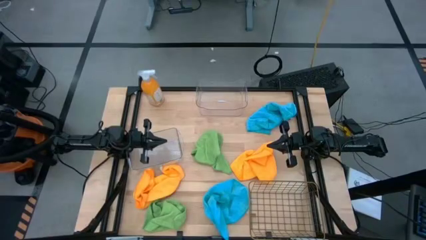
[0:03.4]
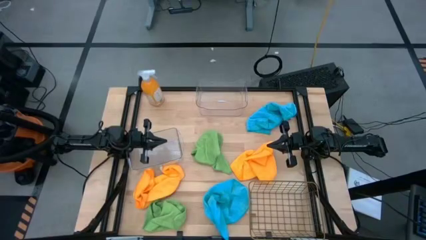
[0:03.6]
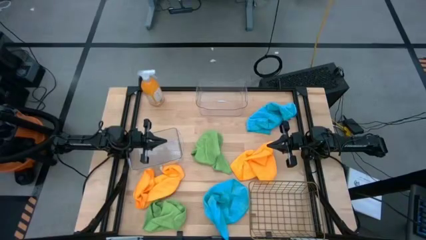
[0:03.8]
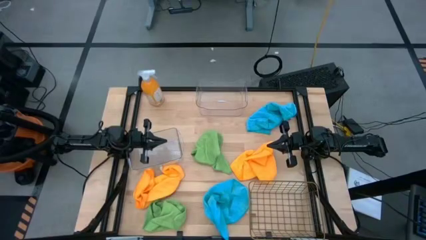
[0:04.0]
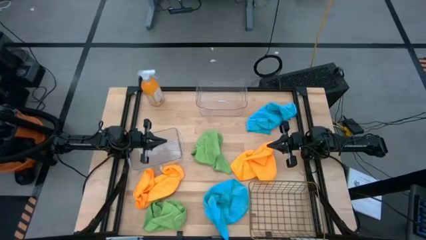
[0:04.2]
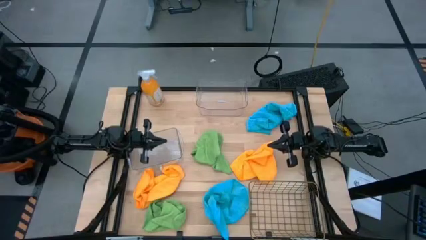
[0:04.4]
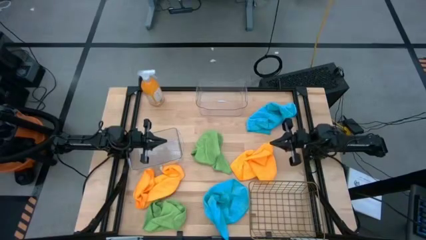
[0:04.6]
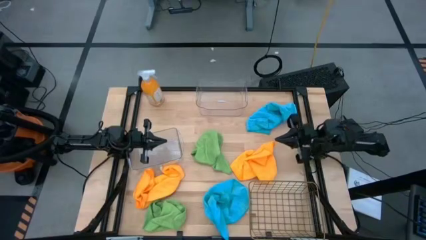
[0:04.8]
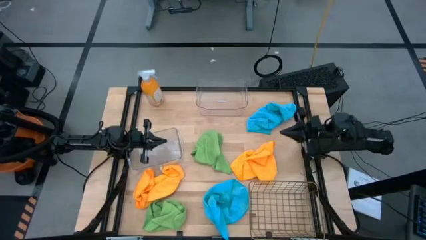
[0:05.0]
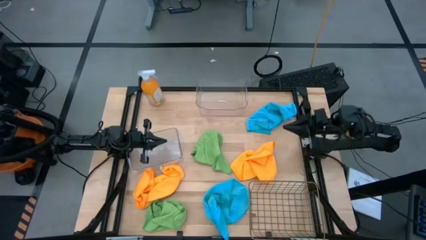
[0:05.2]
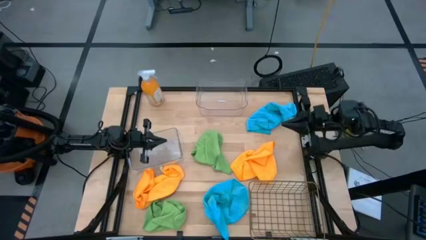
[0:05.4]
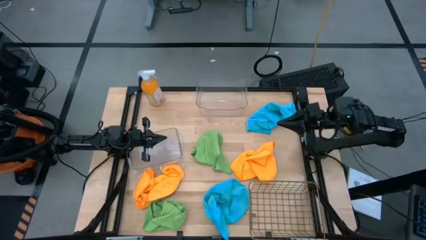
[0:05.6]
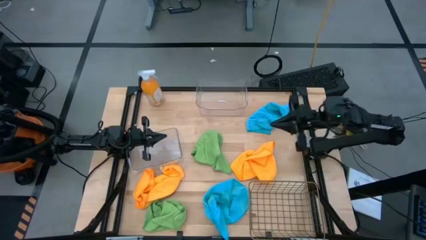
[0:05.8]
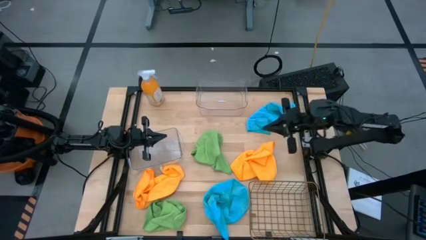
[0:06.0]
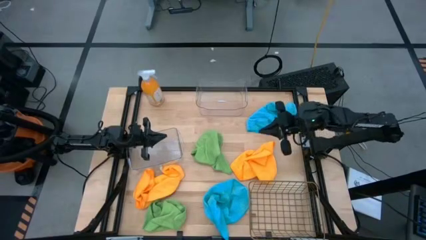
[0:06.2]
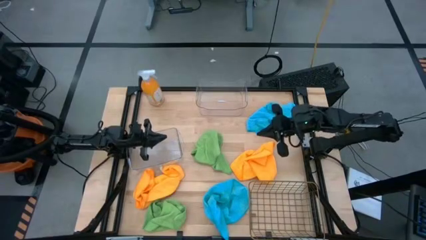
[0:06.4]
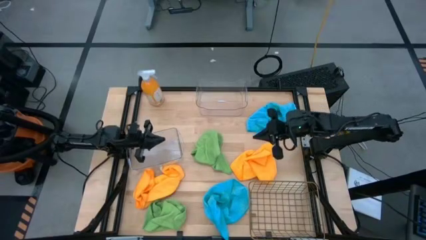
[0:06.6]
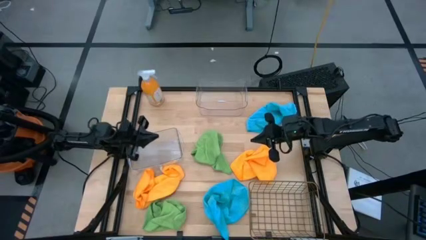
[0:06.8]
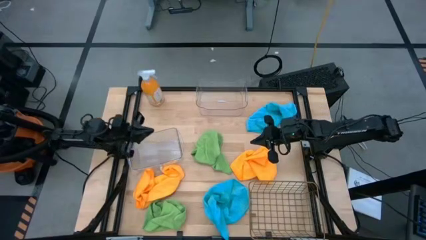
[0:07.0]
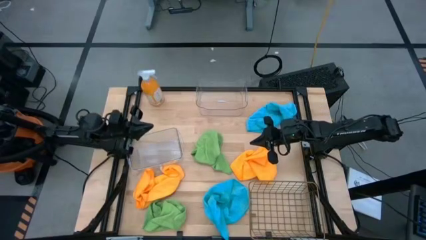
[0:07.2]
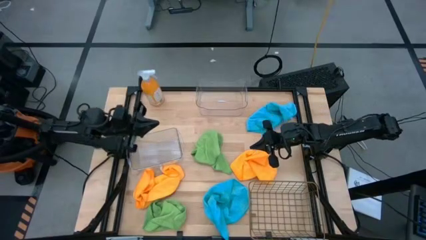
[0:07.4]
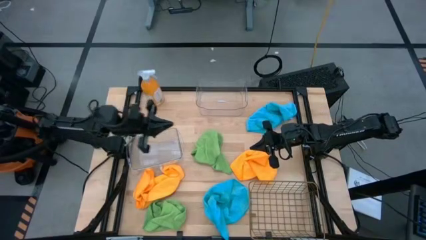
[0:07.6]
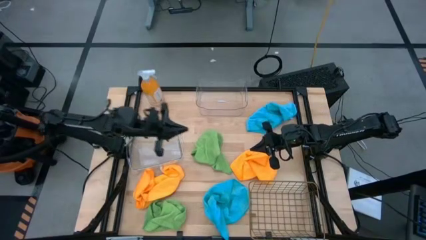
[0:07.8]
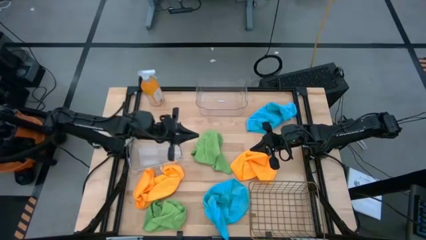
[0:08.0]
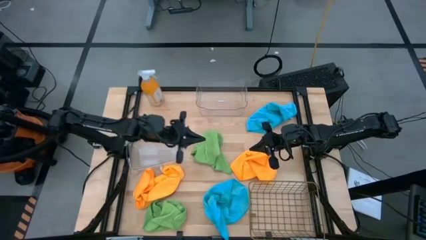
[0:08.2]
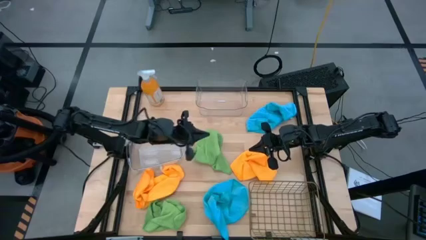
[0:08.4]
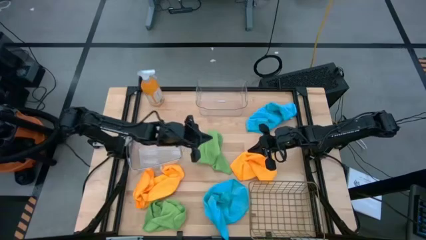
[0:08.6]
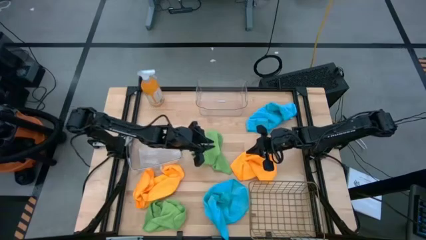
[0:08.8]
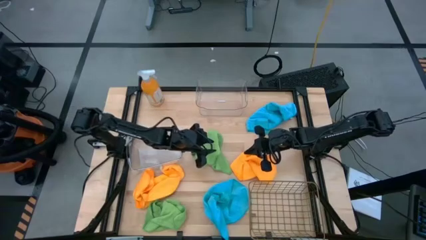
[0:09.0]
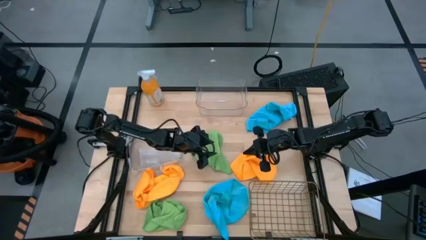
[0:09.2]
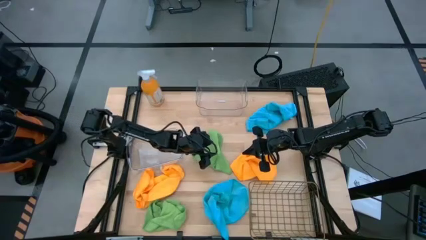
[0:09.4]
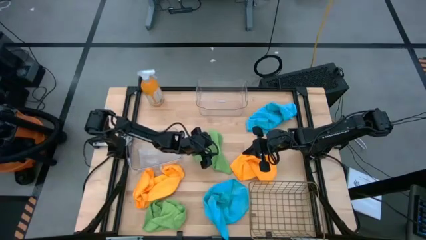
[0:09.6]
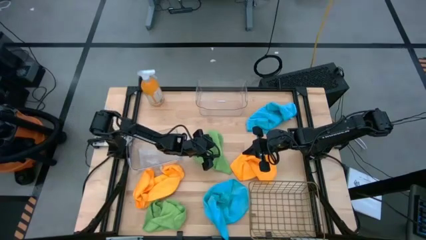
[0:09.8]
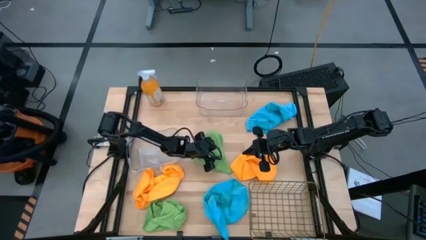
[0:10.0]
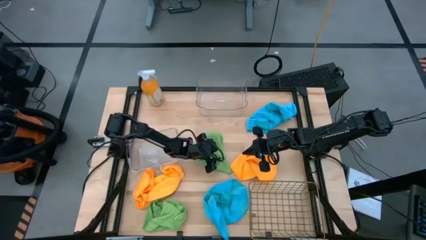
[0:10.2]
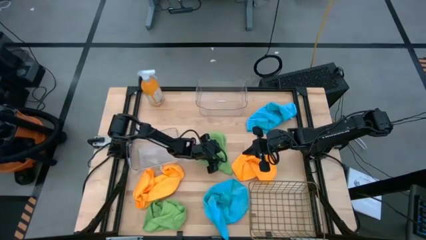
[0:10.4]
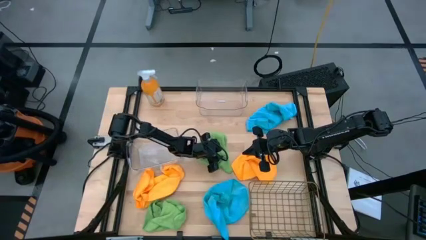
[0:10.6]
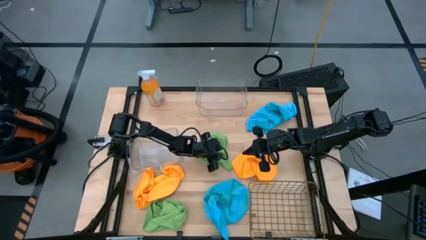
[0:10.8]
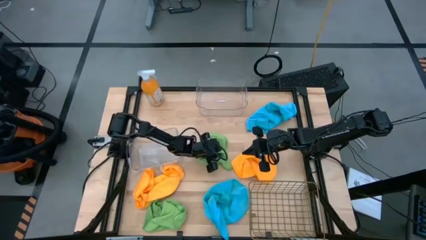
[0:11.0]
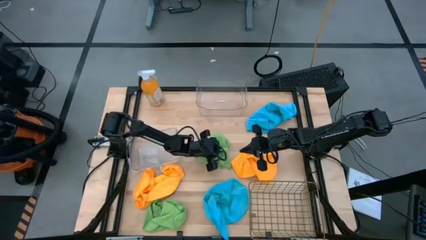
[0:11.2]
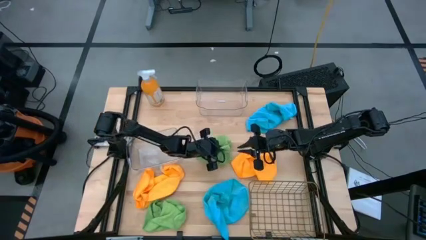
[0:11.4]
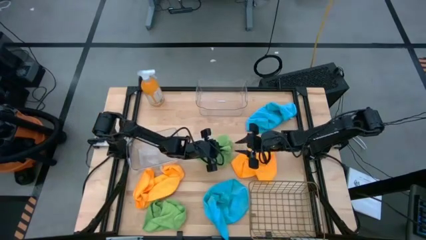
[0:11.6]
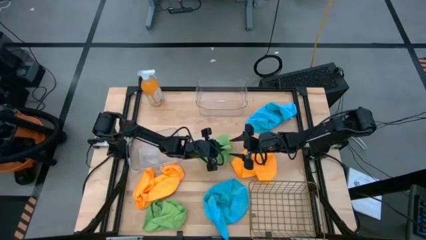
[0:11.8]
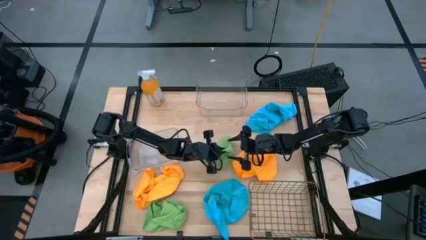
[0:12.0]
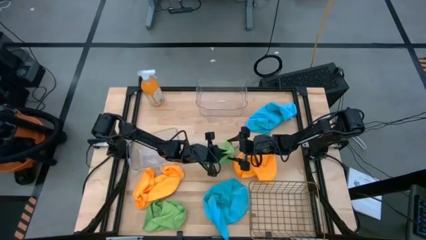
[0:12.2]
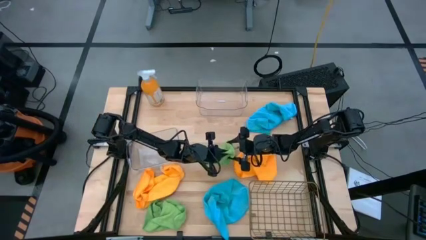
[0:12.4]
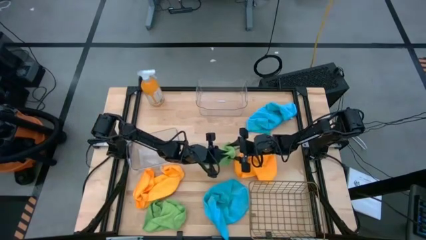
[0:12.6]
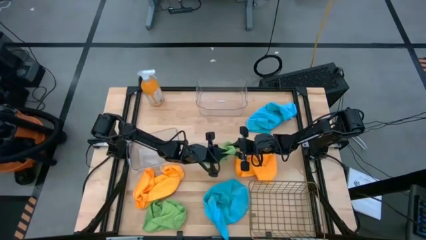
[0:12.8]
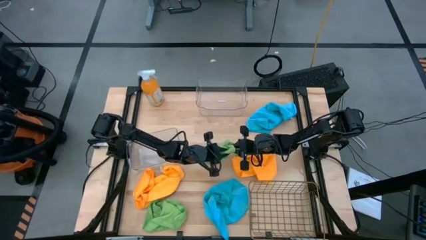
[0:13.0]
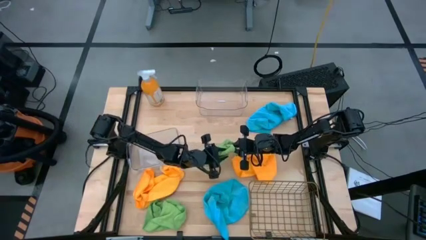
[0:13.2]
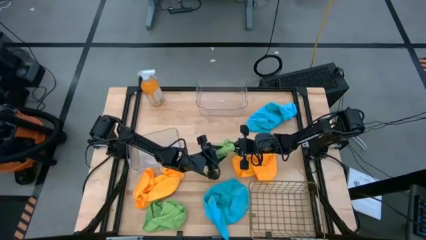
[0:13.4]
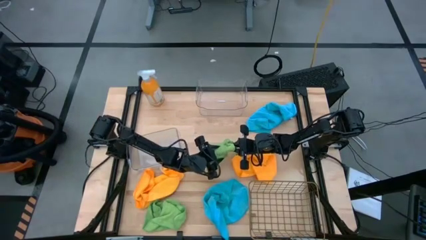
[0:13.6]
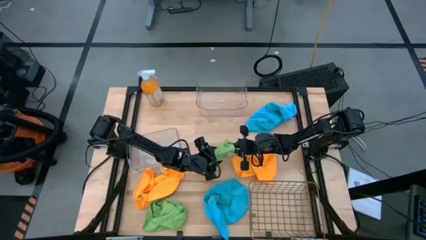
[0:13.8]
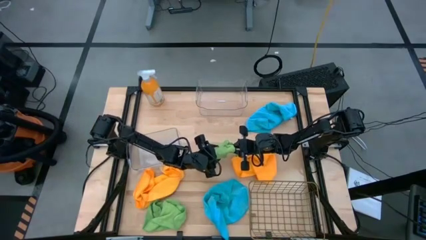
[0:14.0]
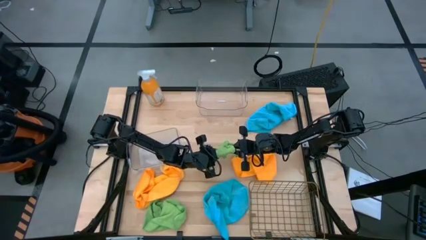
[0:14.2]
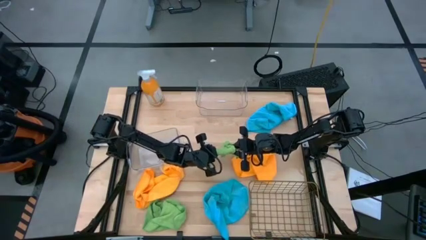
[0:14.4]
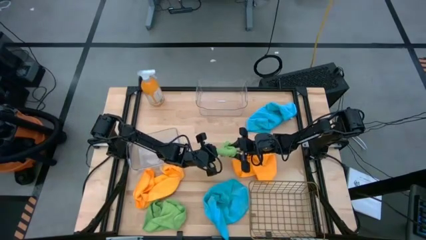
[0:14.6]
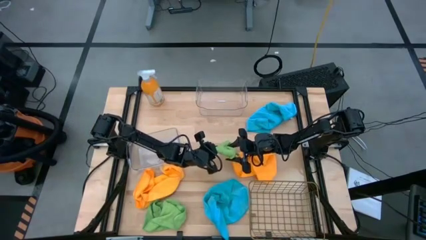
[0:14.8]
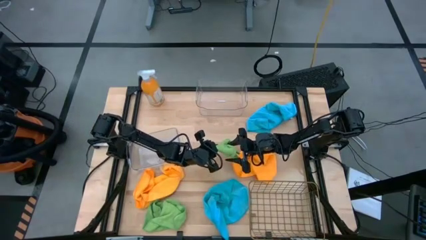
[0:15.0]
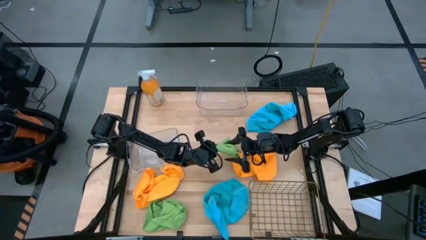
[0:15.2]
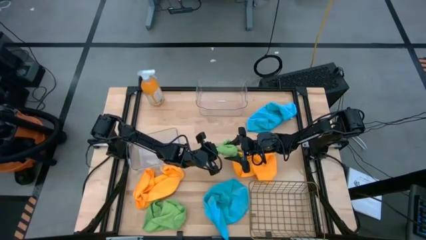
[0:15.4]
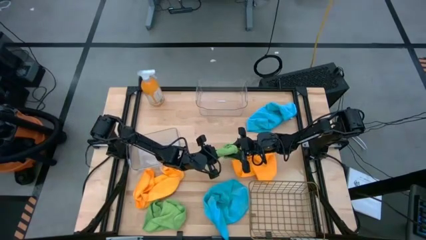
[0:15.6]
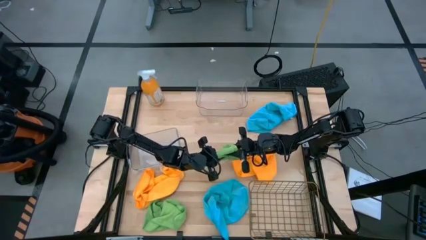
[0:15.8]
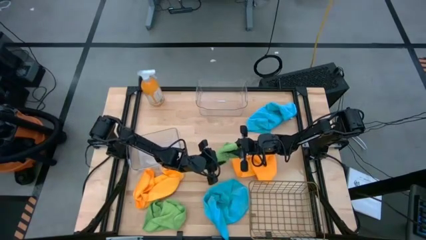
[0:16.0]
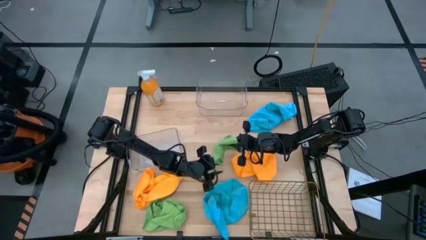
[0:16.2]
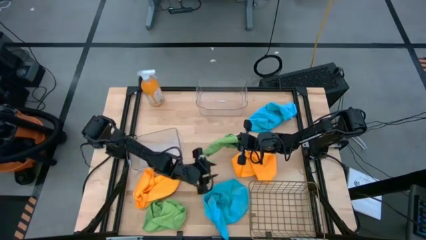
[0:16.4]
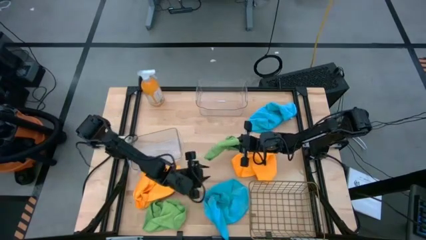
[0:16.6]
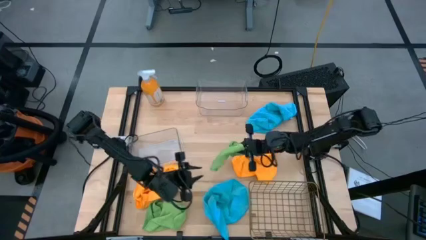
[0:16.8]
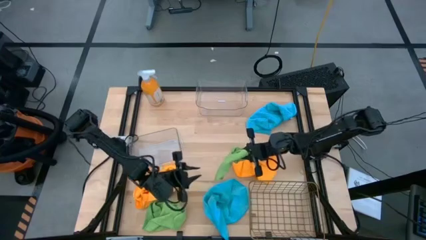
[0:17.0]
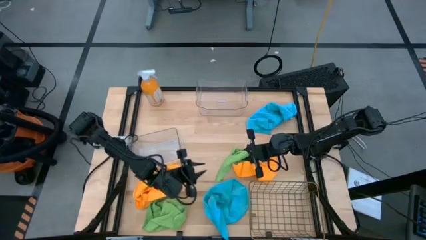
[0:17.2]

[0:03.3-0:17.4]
Task: Sort microfiber towel by color & place in baskets
Put the top green microfiber towel into the bottom transparent bin

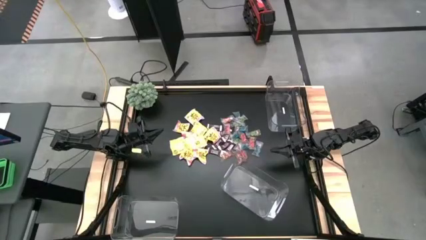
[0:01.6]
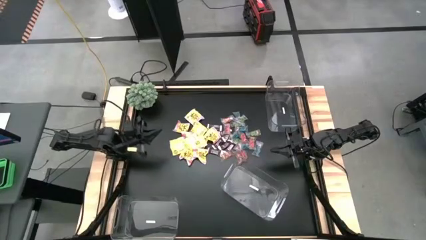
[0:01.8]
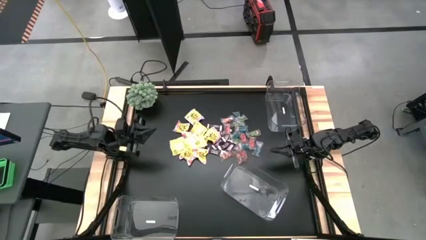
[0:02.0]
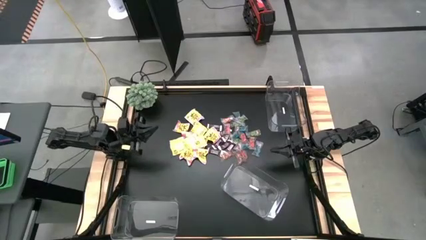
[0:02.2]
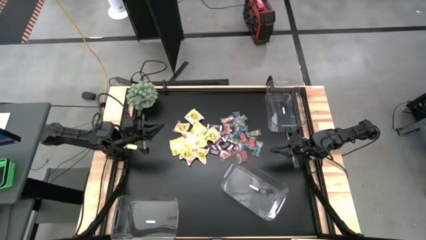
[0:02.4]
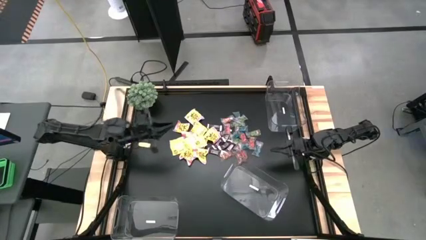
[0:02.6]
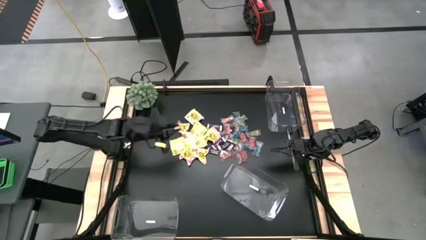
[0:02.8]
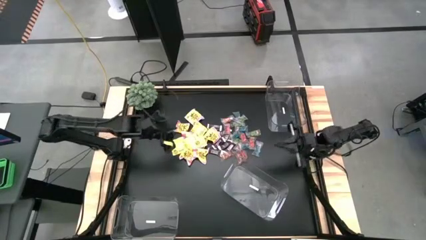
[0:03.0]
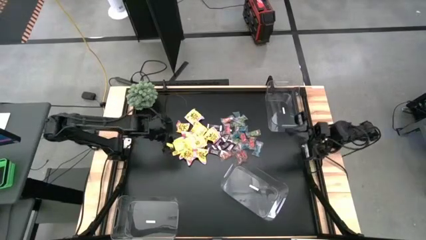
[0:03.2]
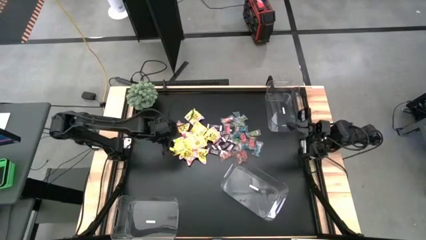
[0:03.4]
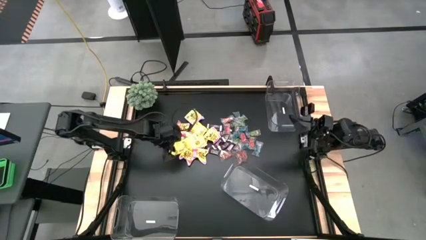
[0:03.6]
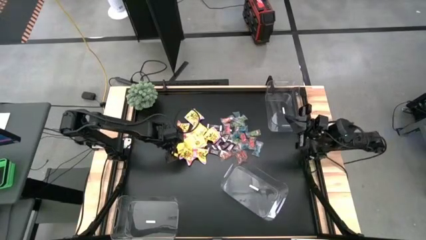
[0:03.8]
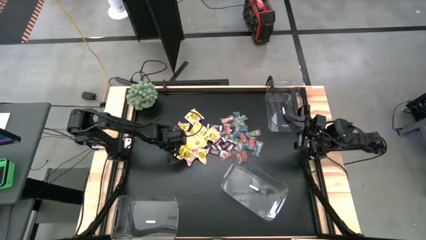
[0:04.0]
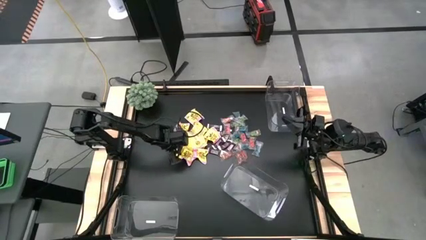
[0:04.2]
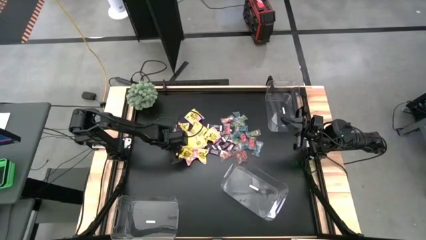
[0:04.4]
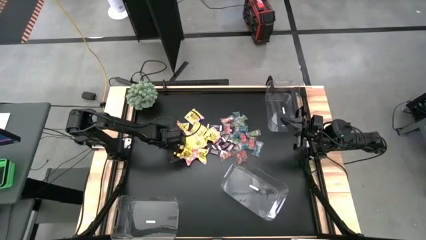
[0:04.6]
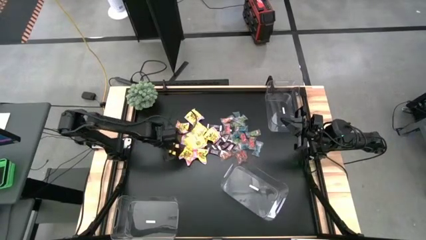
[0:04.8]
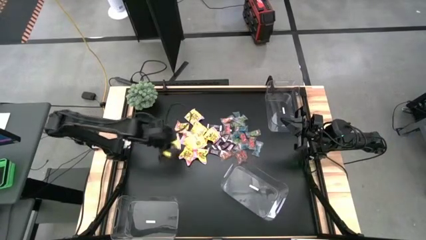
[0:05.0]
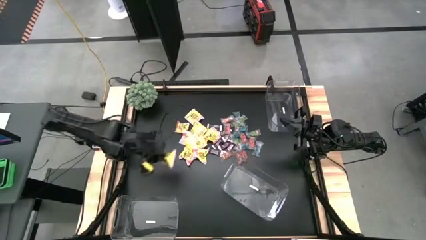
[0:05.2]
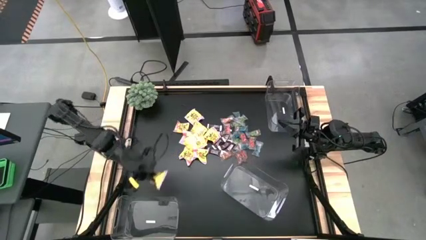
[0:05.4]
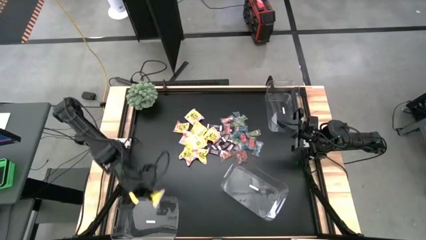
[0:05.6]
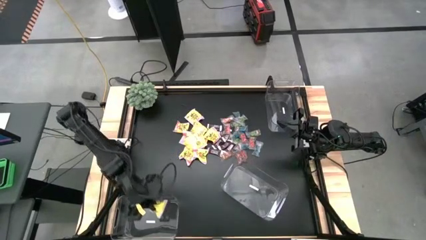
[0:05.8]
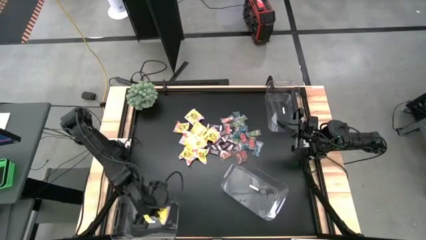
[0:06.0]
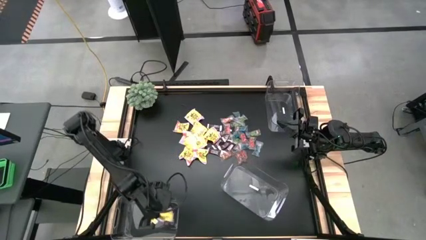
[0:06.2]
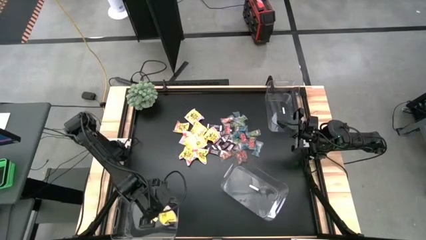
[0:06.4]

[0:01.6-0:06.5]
Task: Sort candy
Put the yellow candy in the bottom left transparent container
